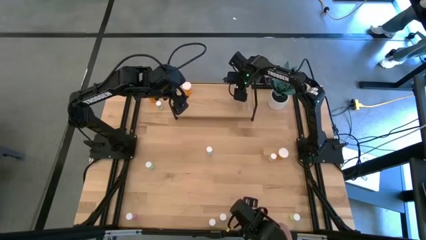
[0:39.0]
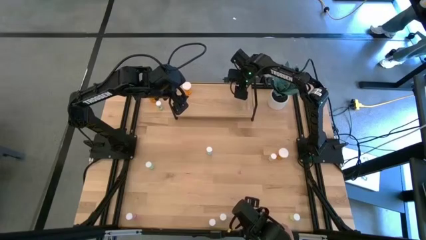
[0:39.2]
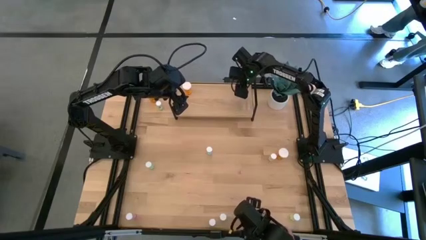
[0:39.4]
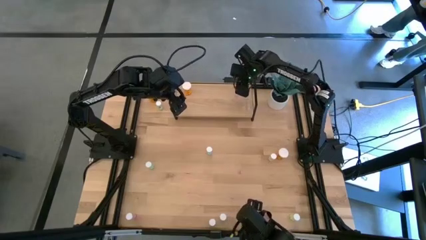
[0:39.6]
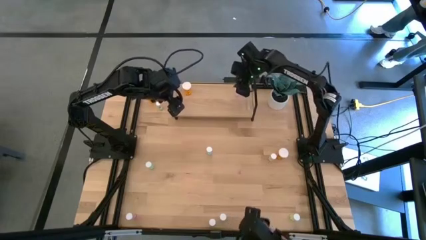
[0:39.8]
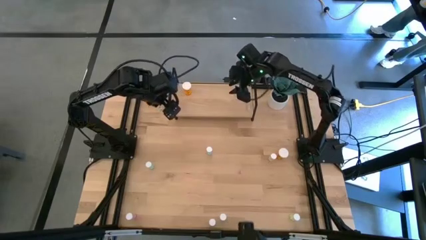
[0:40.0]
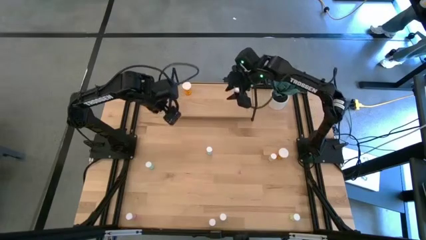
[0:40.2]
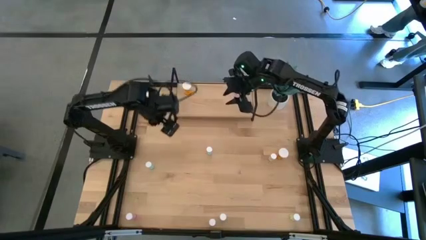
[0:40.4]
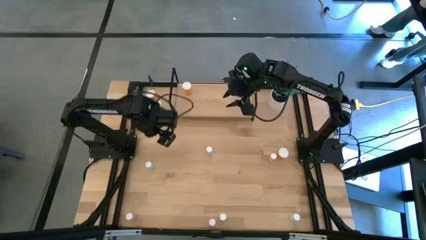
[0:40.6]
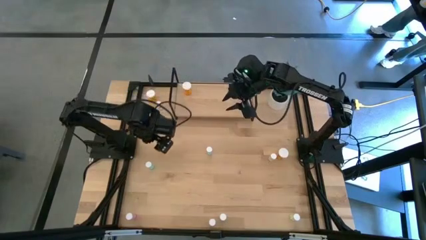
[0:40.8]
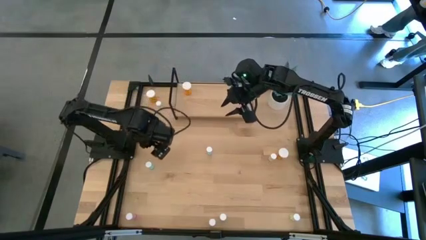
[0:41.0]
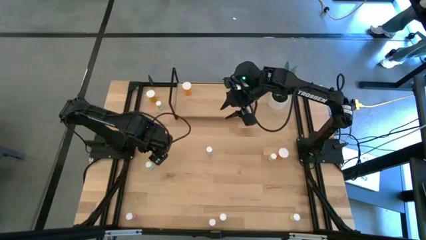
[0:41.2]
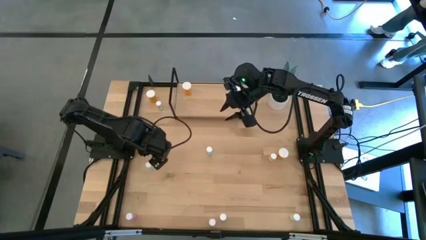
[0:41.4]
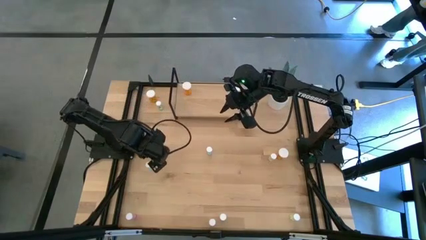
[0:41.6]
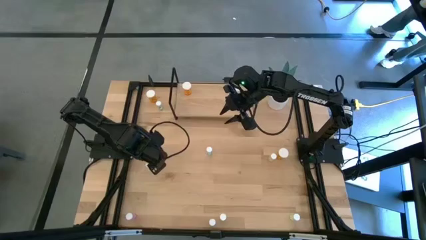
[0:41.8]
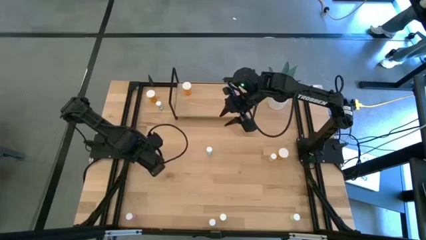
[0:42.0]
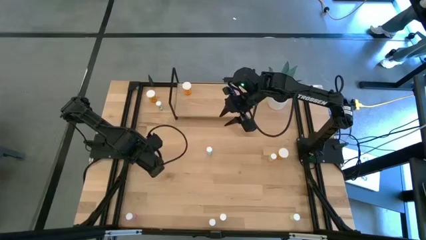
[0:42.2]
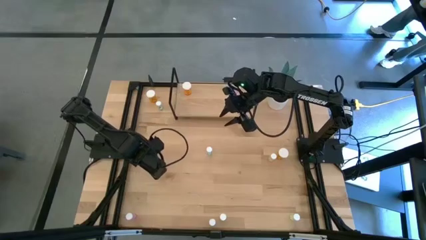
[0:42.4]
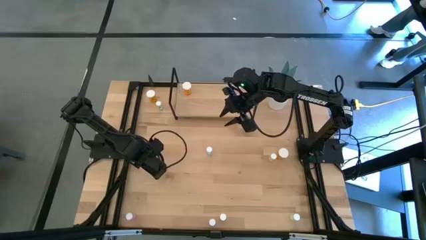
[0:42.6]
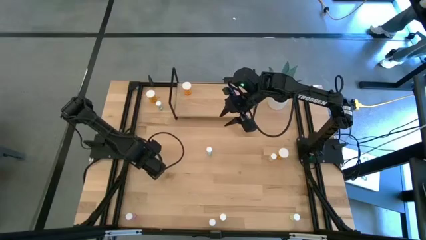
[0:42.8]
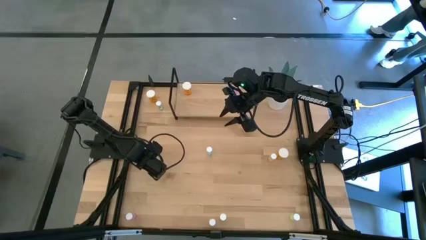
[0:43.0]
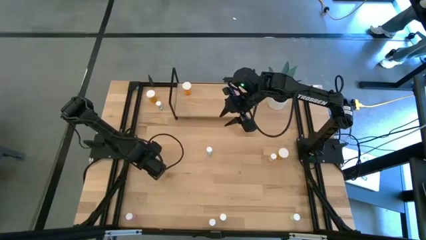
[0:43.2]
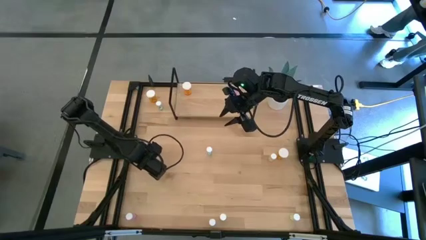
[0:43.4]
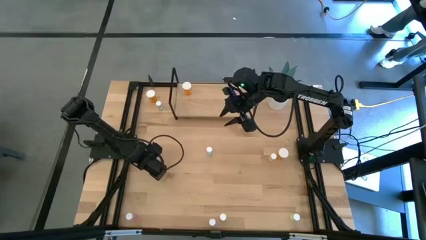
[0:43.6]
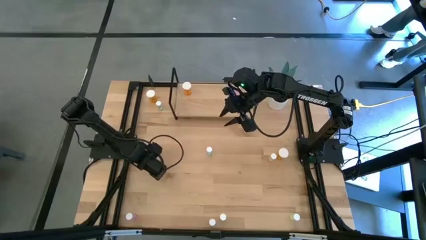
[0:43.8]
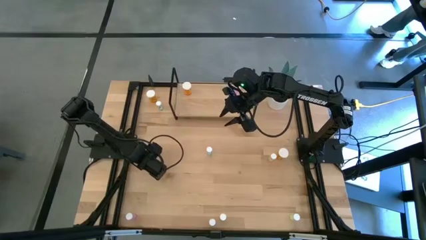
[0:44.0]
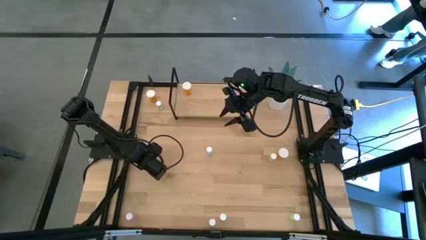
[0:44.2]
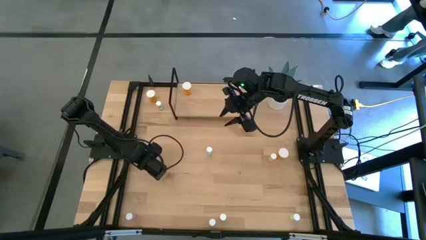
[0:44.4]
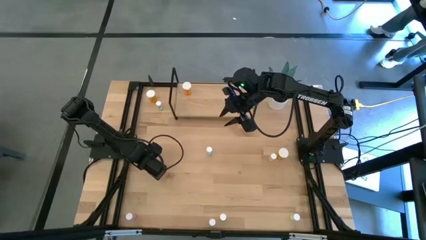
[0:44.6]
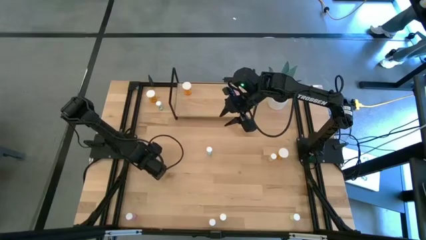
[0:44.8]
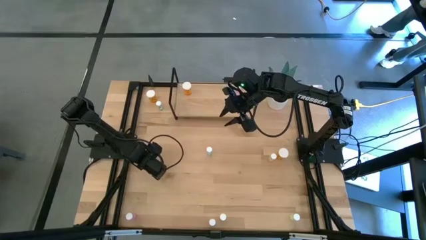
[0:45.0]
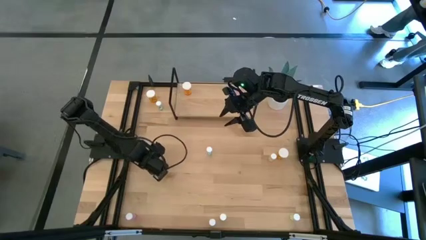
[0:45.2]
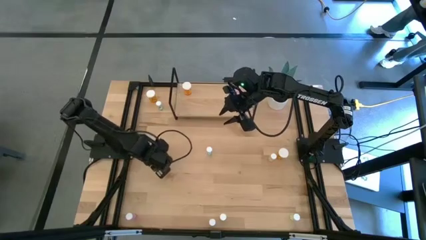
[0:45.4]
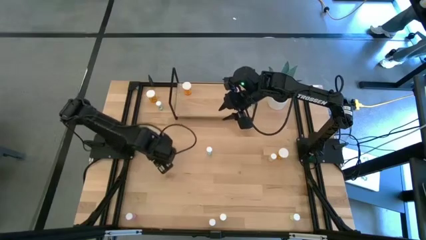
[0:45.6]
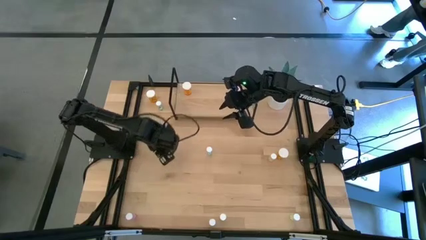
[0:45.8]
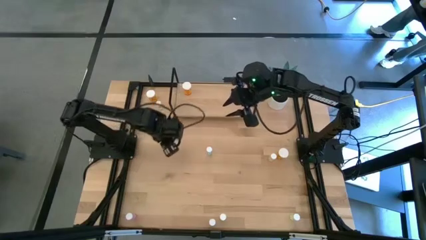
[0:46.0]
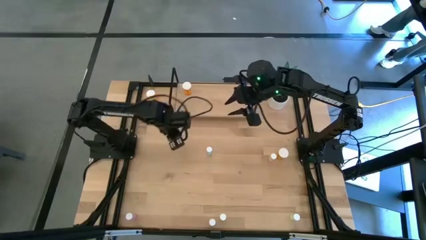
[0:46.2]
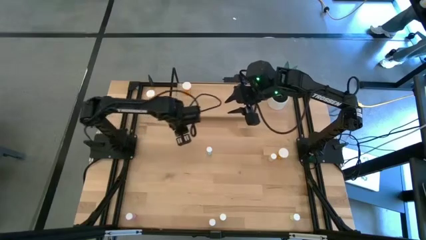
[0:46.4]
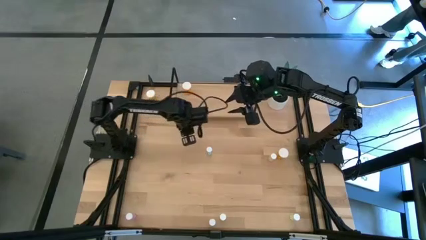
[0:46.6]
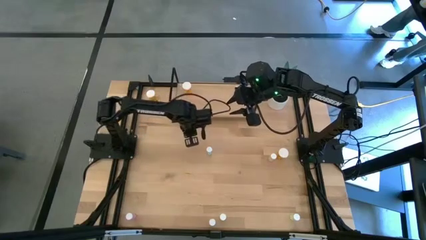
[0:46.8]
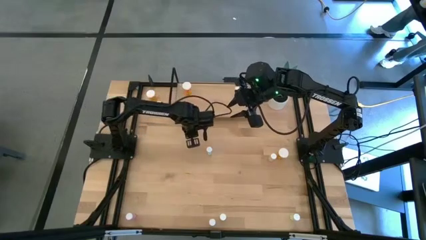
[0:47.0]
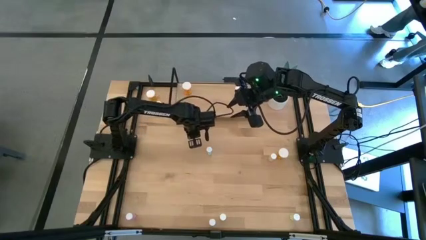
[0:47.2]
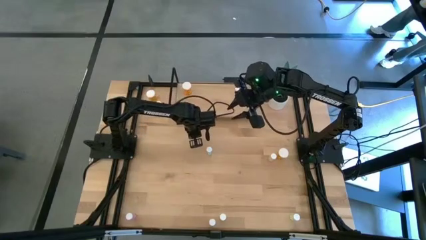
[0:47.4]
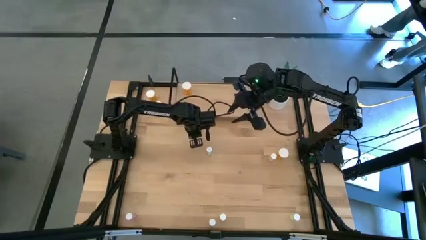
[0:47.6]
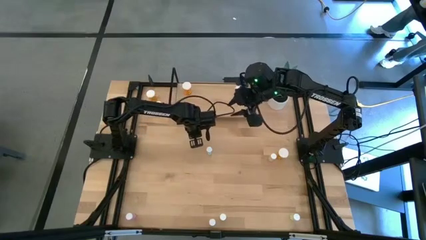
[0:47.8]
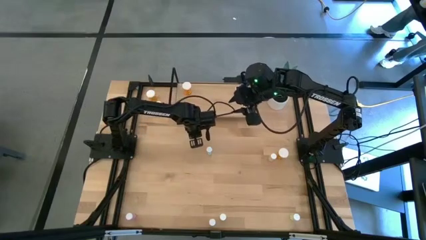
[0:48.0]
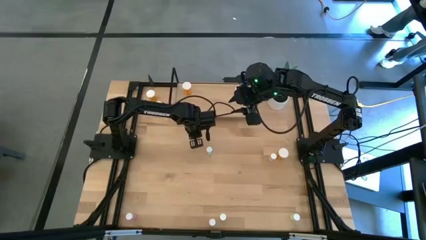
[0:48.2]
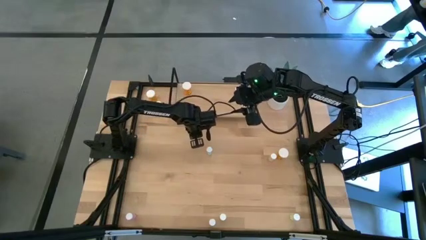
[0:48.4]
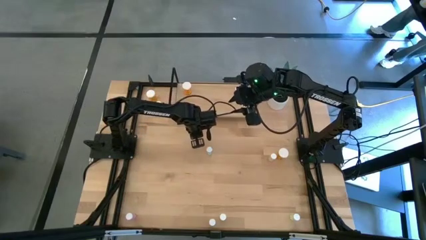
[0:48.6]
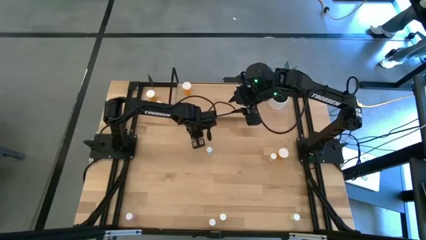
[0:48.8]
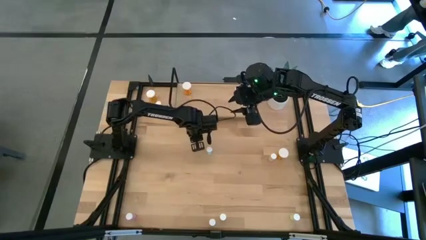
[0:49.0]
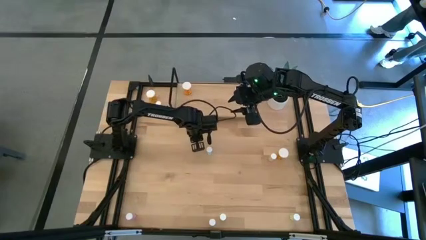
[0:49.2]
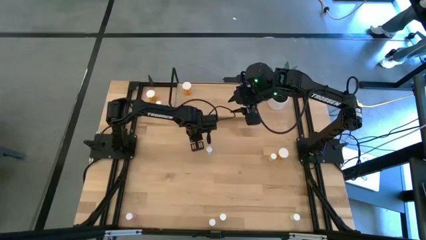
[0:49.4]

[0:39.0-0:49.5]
Task: Pick and place medicine bottles onto shelf by color
Put the bottom right blue pill bottle on the shelf
